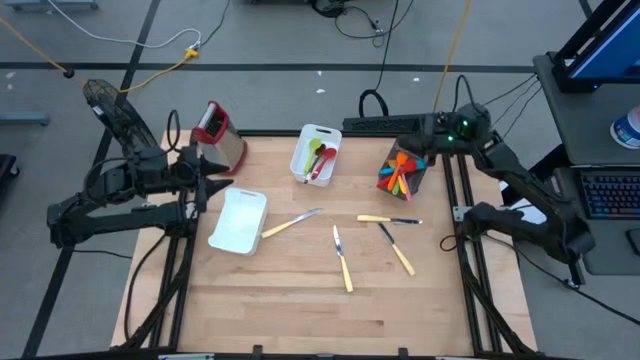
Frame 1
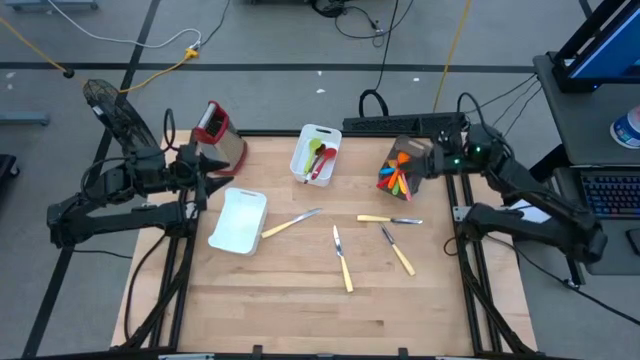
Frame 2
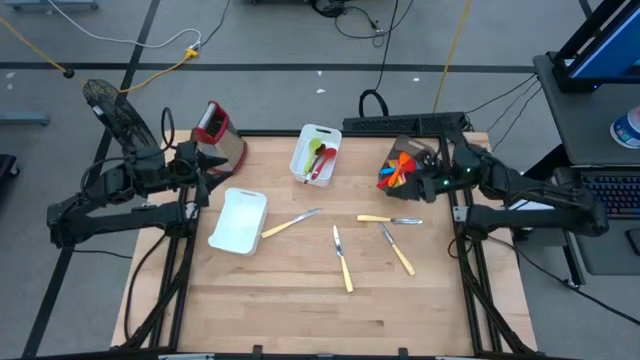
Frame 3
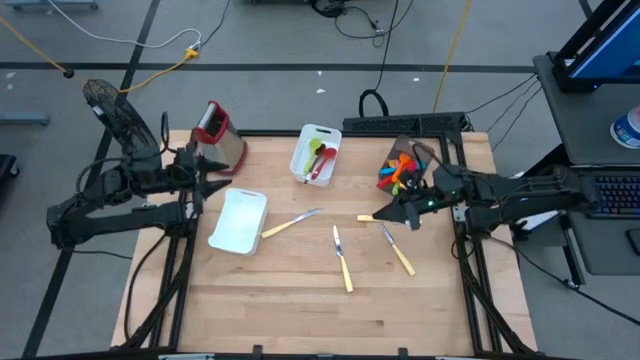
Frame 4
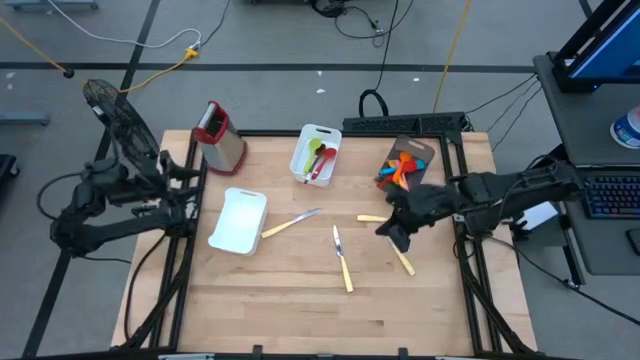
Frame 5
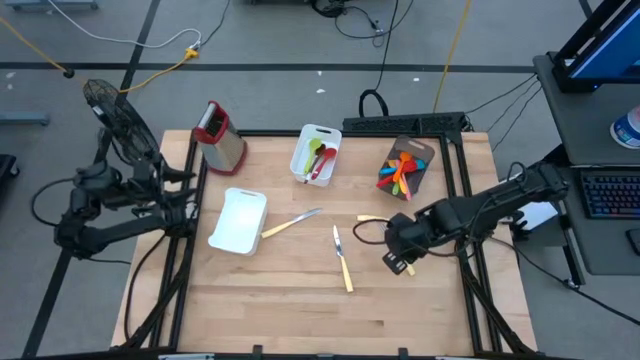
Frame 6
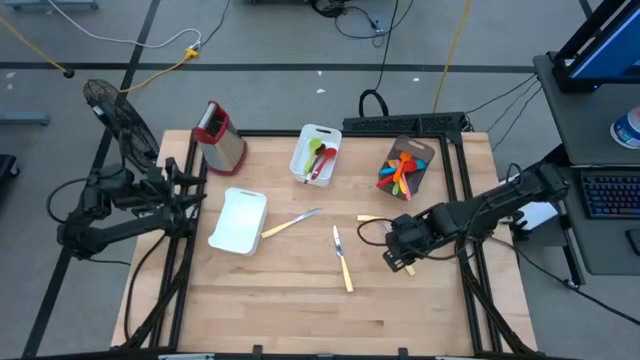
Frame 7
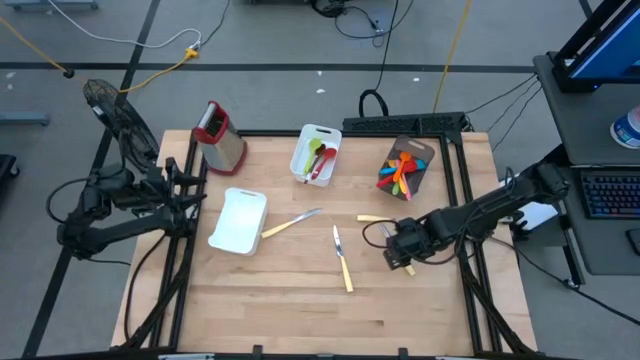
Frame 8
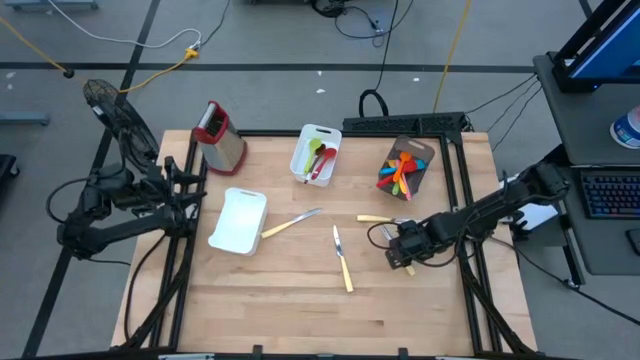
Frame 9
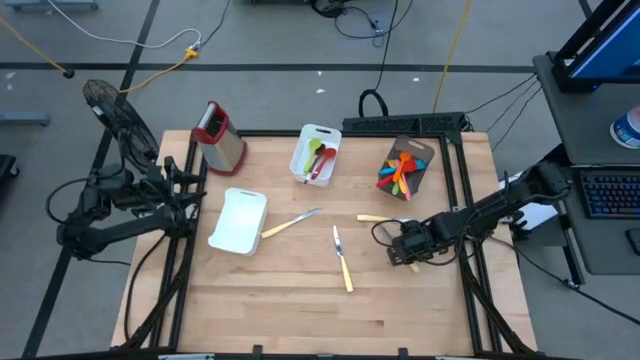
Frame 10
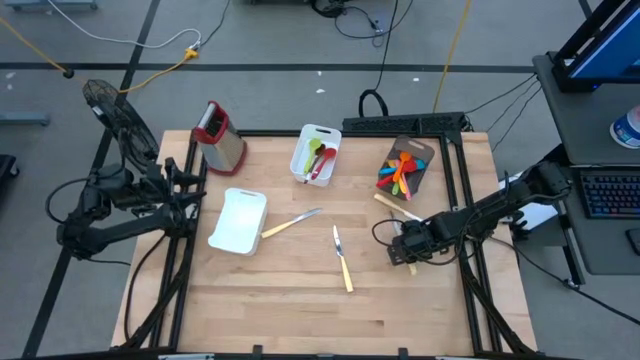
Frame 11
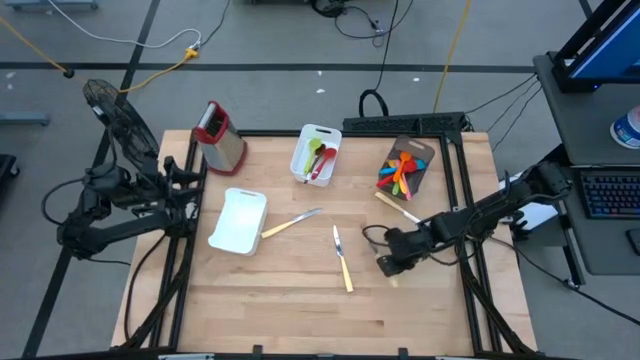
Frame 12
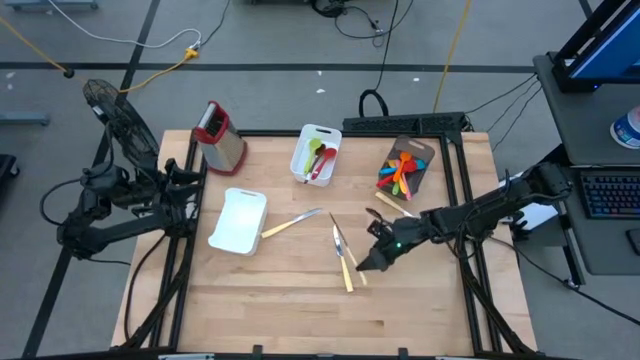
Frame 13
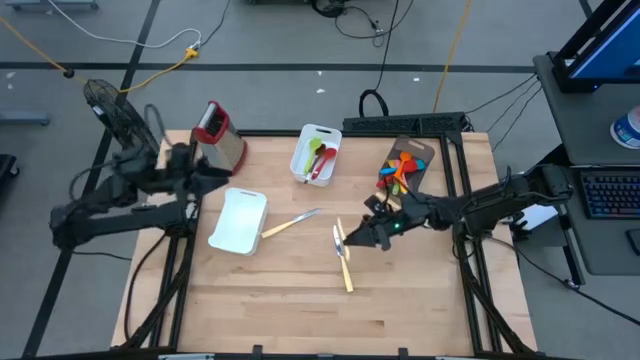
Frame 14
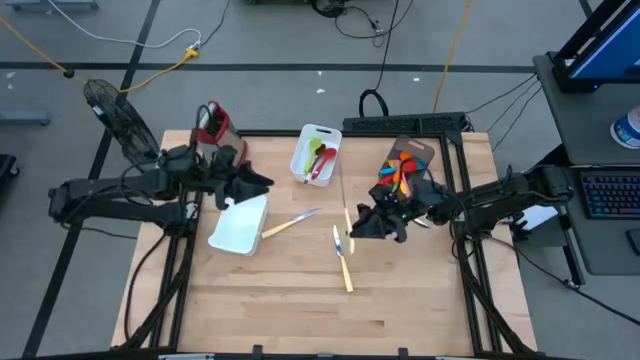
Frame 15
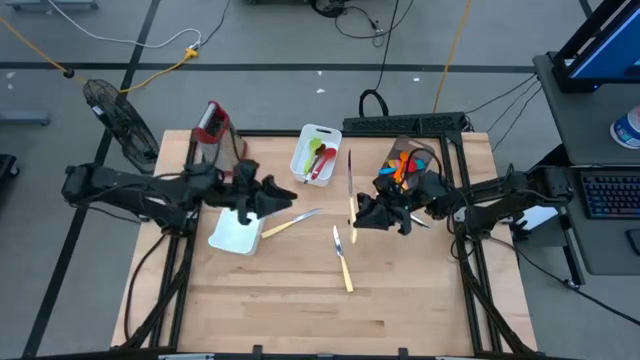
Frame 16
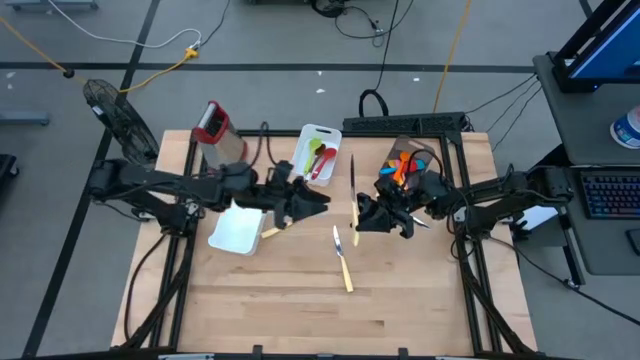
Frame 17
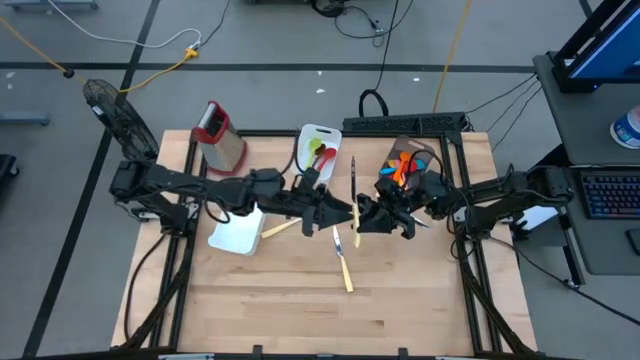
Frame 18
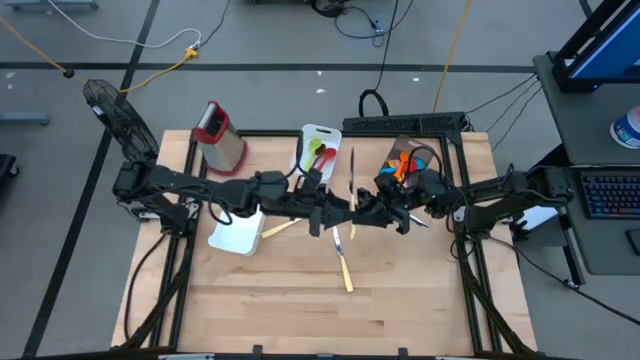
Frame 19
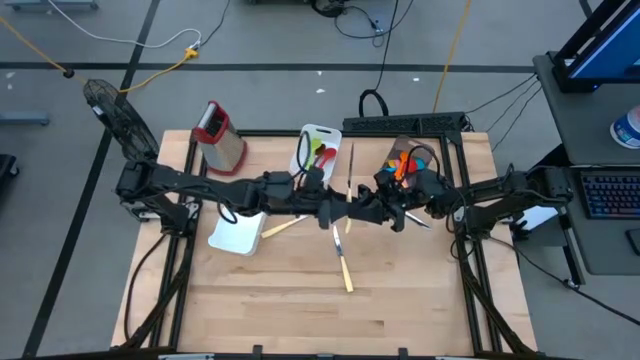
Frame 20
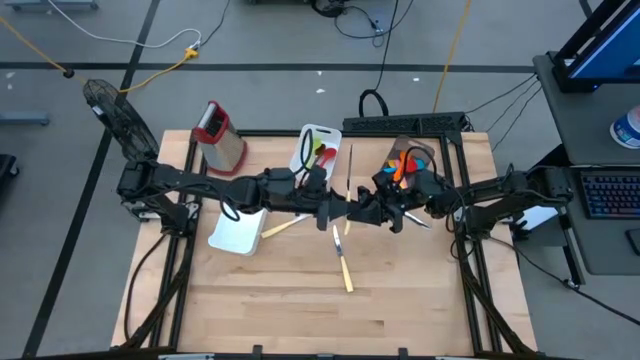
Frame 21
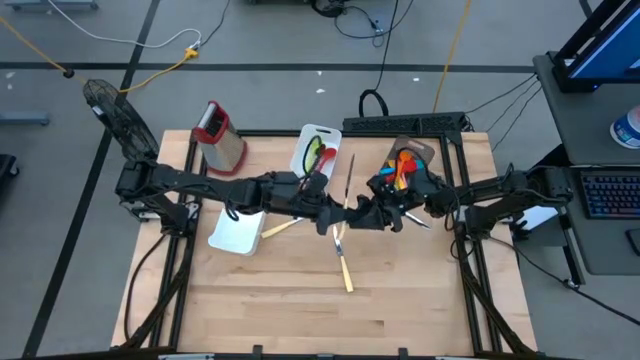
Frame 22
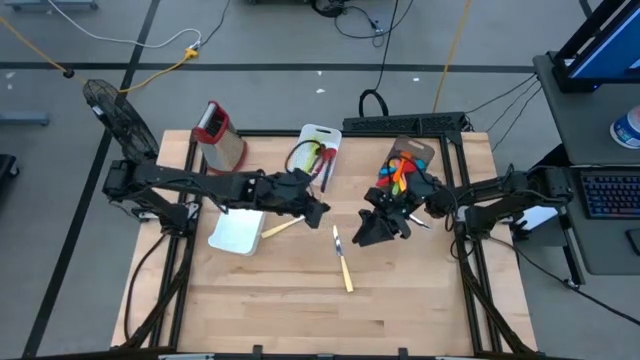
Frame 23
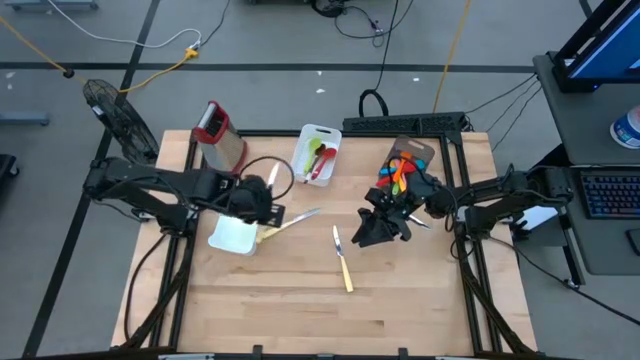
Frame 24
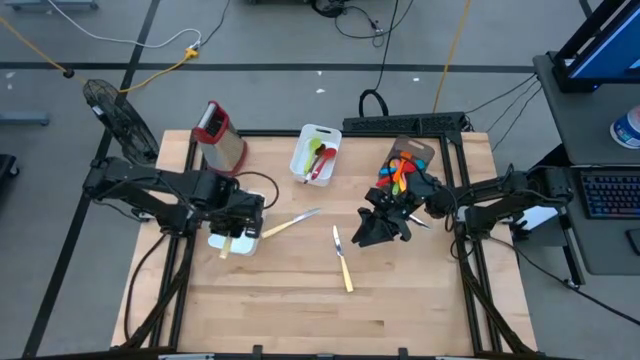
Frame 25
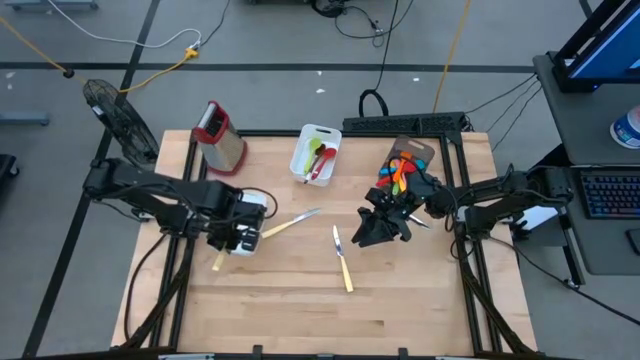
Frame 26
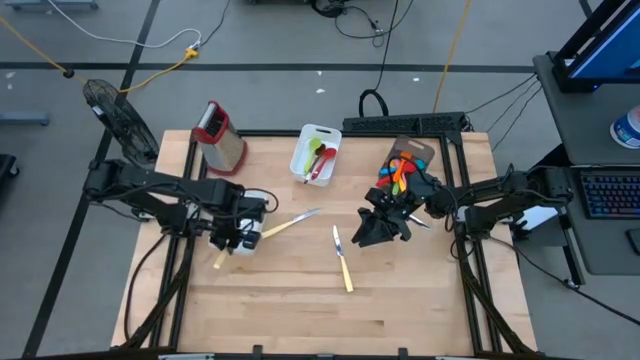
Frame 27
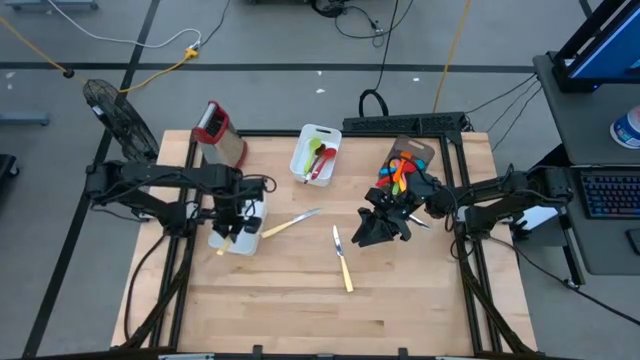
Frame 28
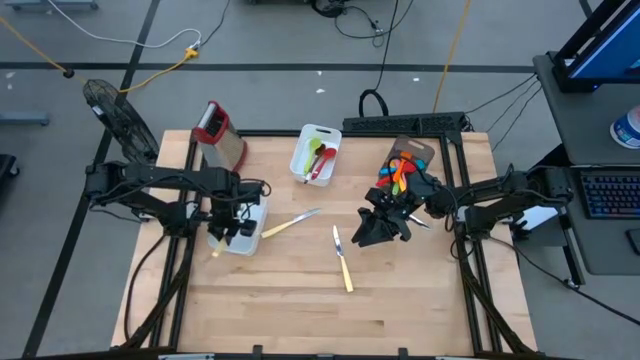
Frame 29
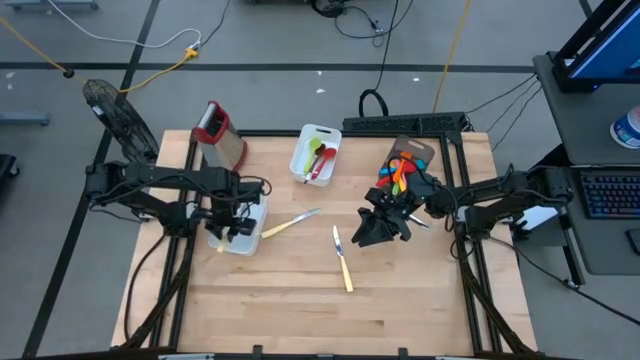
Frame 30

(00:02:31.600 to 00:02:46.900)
Task: Pick & Place Kitchen Items
Put the yellow knife into the bottom white bin

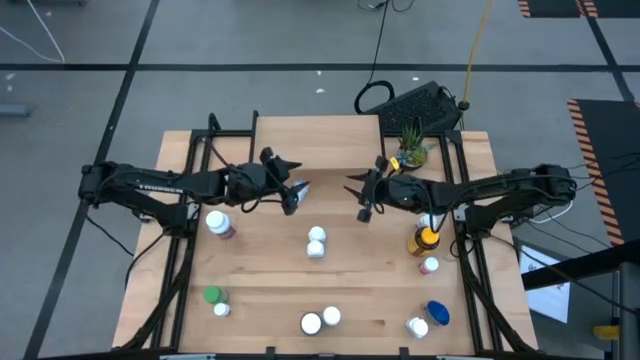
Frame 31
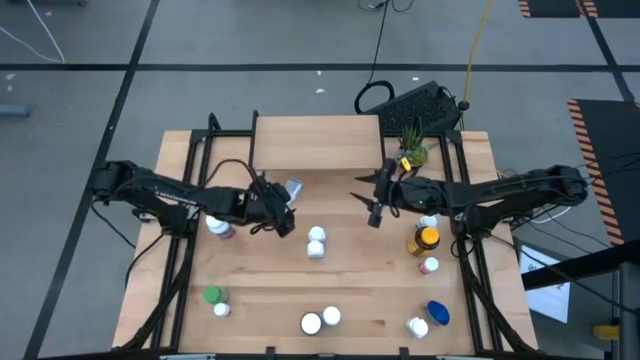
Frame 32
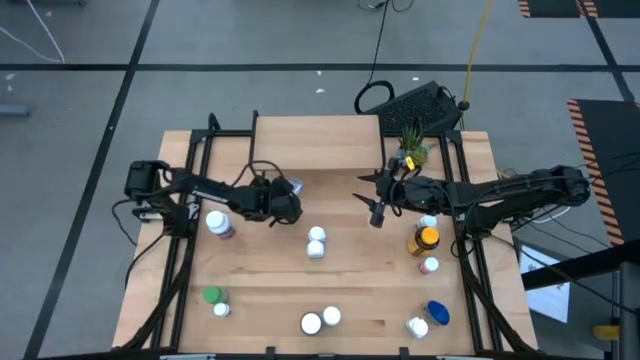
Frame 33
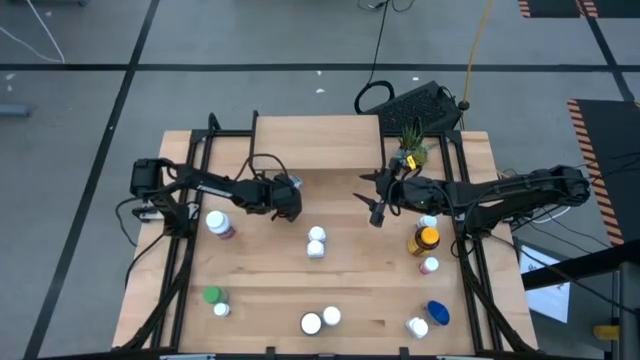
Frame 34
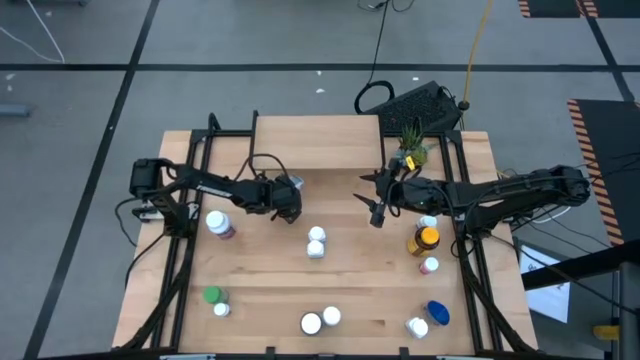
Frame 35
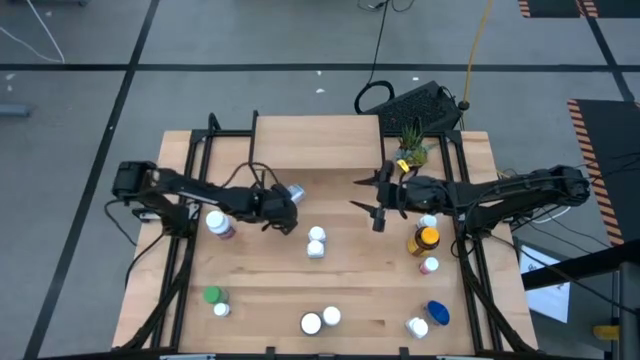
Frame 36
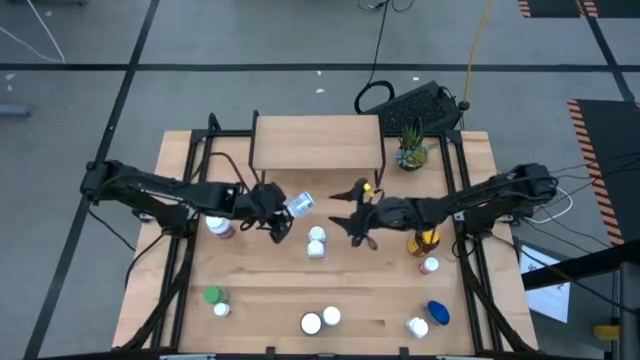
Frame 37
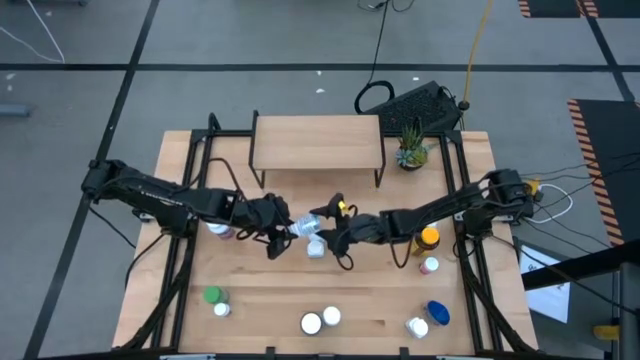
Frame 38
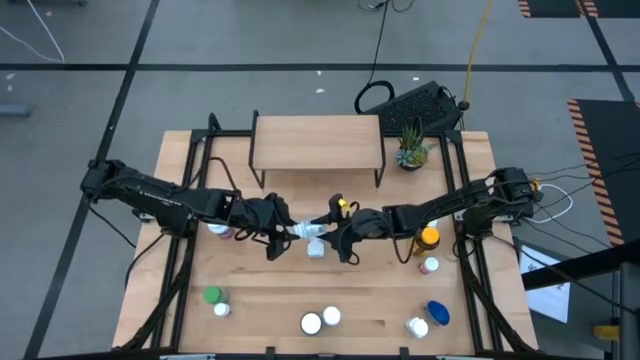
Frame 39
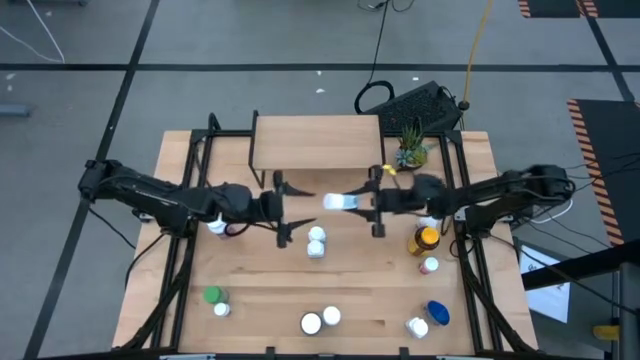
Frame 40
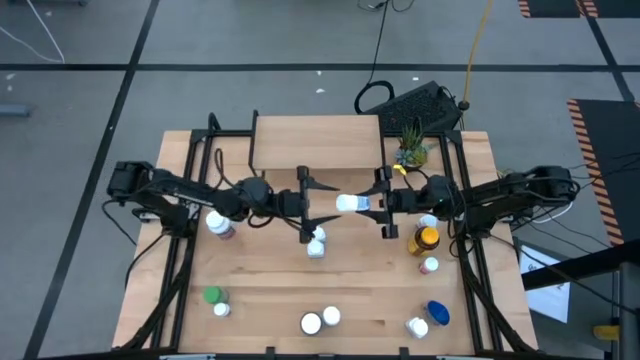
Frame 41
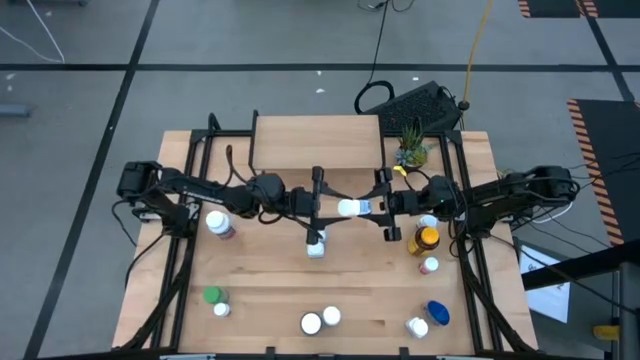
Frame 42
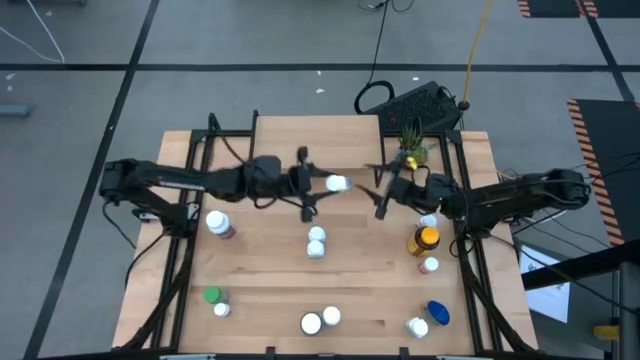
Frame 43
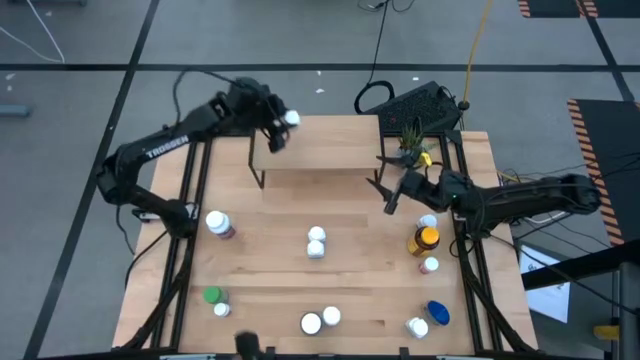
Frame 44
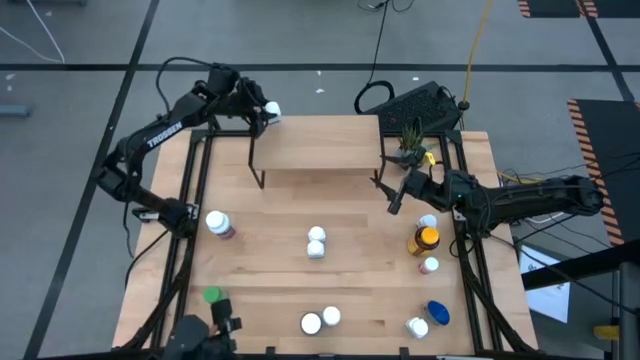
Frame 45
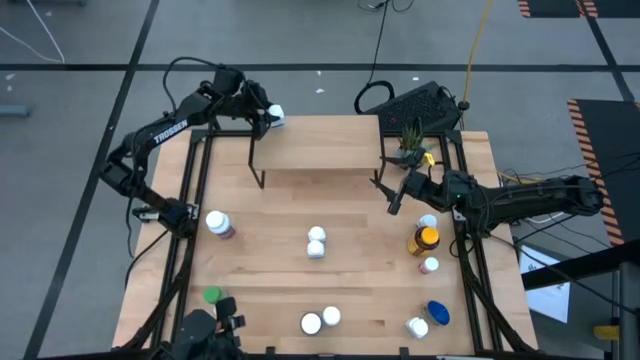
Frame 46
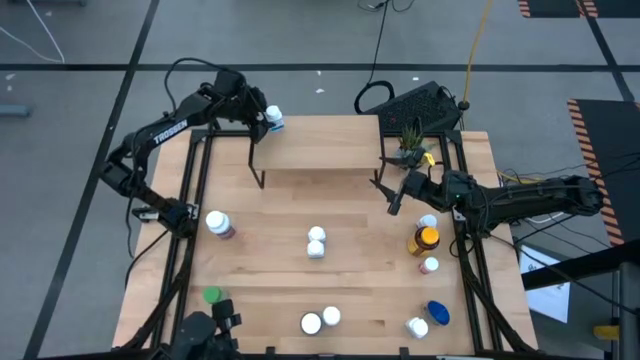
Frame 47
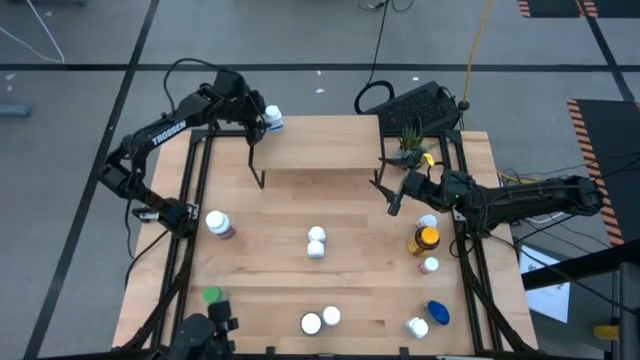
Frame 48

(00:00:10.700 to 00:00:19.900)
Task: Pick and place medicine bottles onto shelf by color
Put the white pill bottle on the shelf
